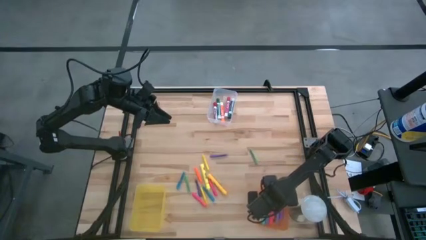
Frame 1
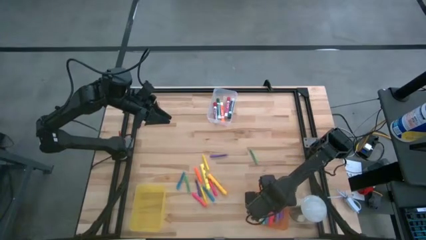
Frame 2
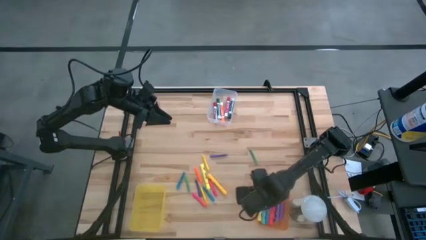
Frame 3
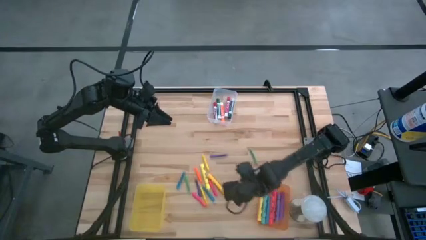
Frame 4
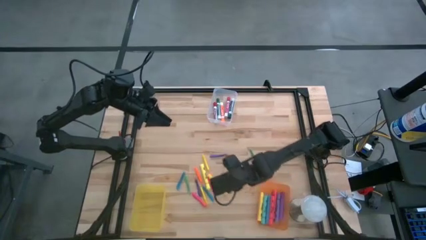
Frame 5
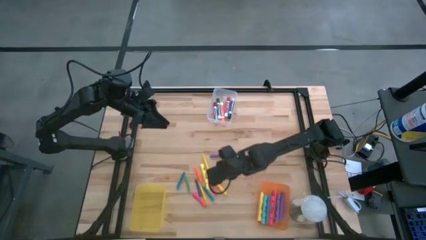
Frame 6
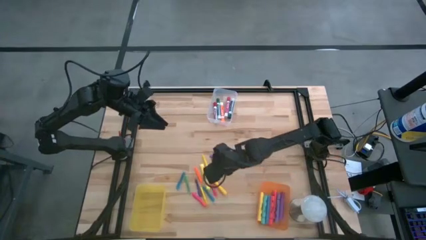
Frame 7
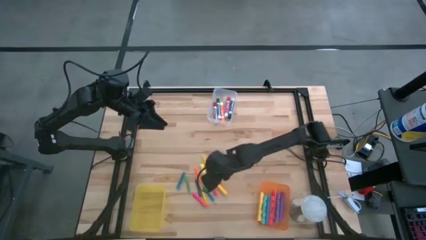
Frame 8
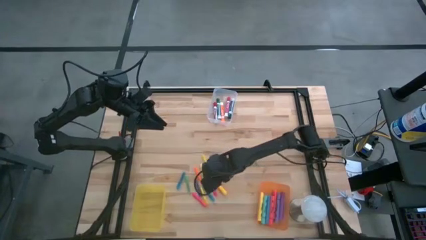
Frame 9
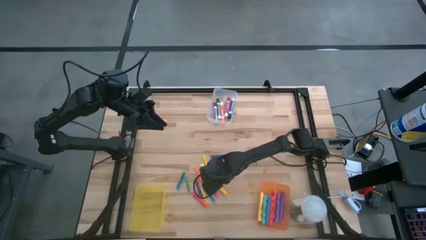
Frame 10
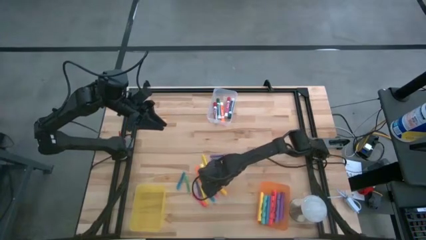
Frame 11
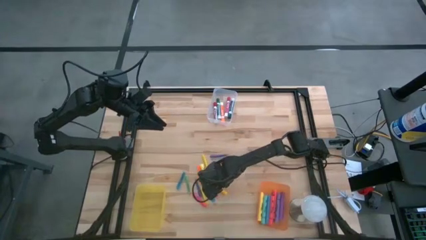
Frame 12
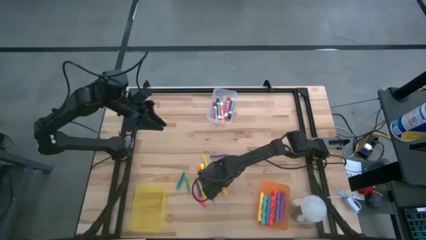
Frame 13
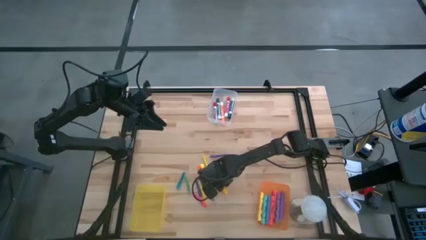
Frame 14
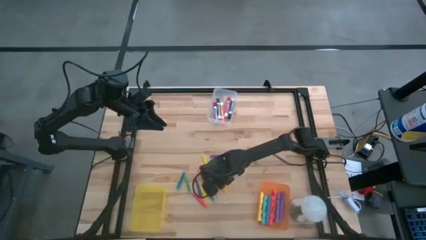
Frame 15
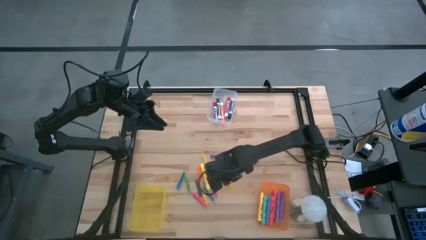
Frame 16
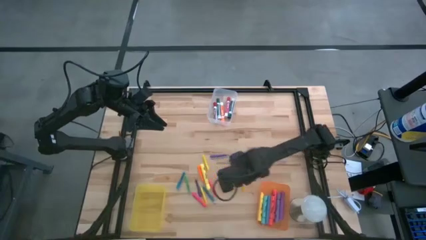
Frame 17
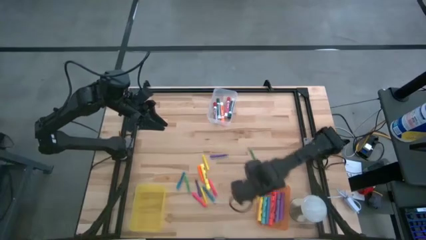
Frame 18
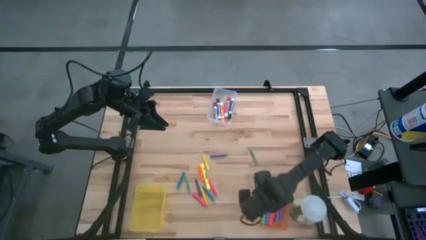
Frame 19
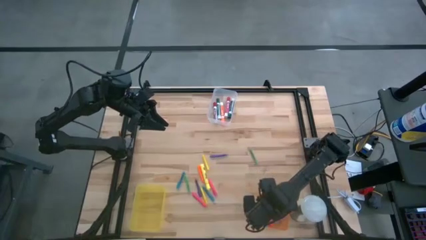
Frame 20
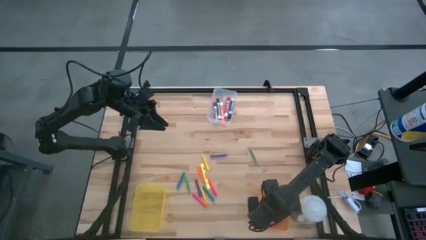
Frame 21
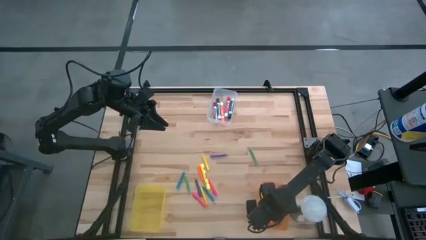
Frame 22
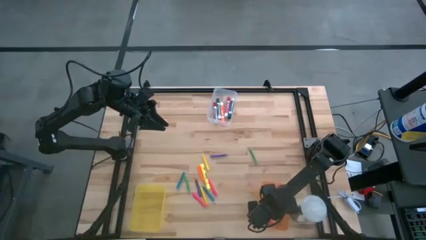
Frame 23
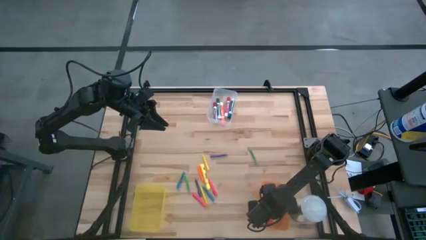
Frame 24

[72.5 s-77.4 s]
Task: Pick & Place Markers
Put the yellow highlighter into the orange bin

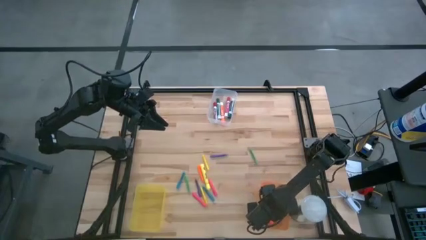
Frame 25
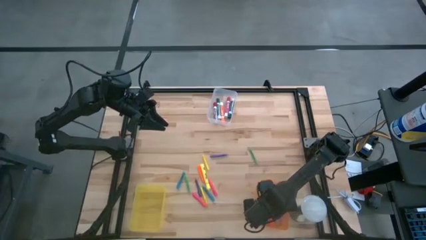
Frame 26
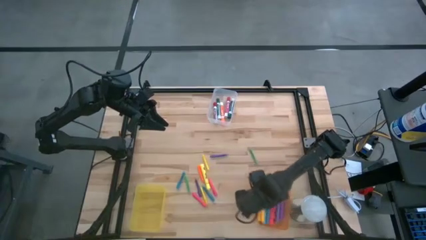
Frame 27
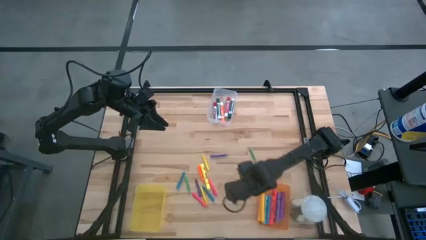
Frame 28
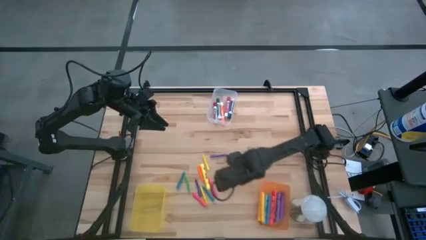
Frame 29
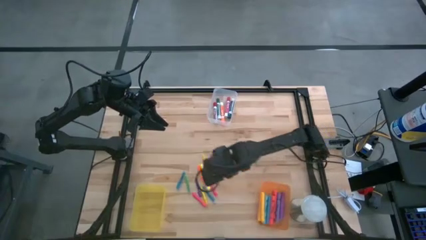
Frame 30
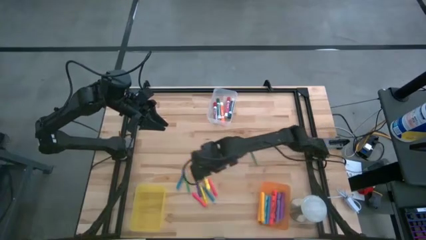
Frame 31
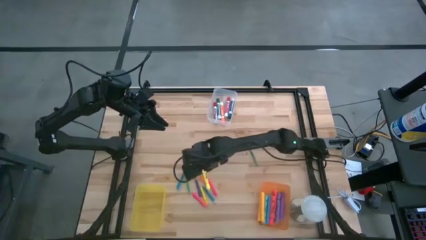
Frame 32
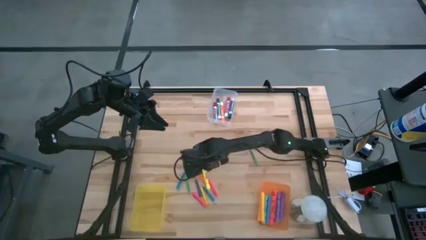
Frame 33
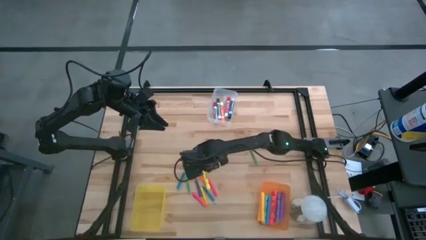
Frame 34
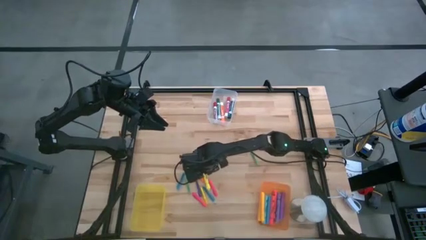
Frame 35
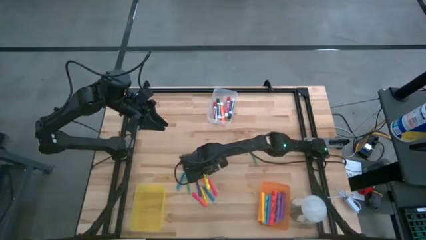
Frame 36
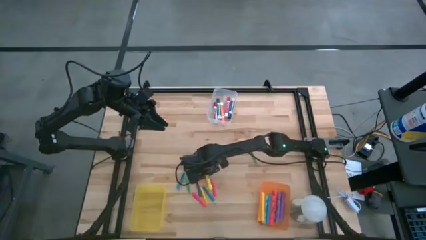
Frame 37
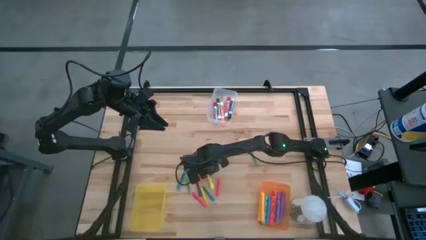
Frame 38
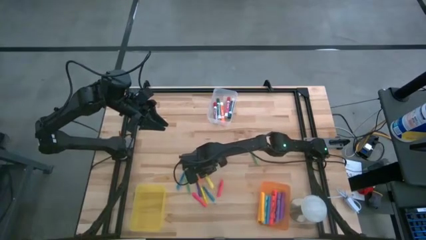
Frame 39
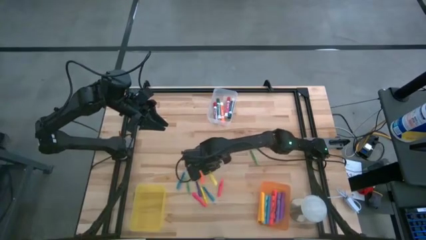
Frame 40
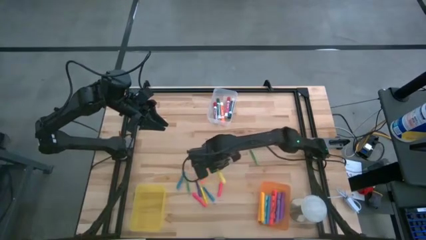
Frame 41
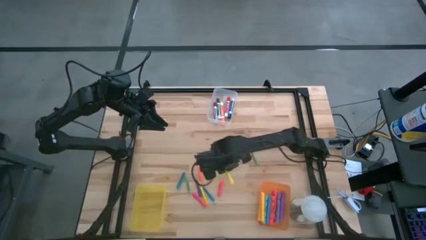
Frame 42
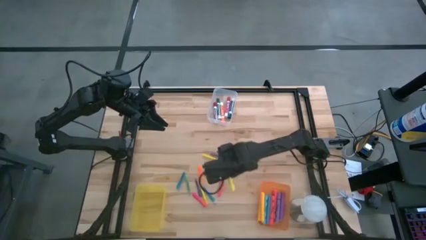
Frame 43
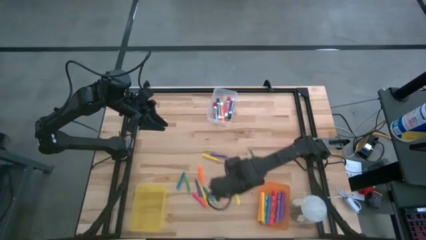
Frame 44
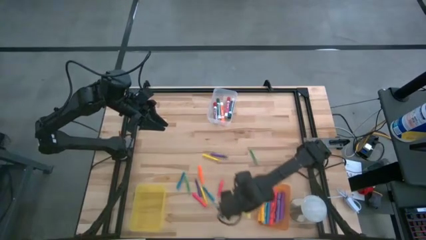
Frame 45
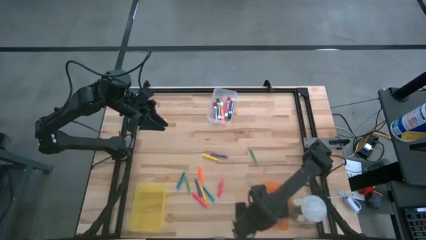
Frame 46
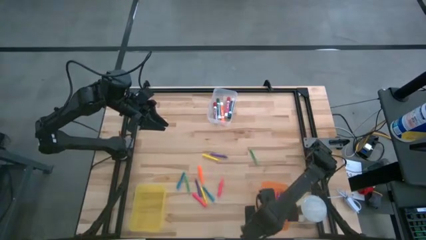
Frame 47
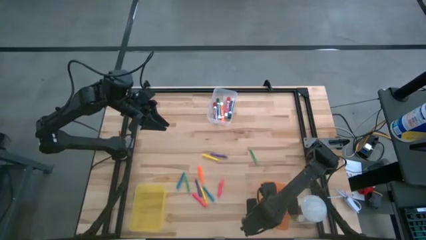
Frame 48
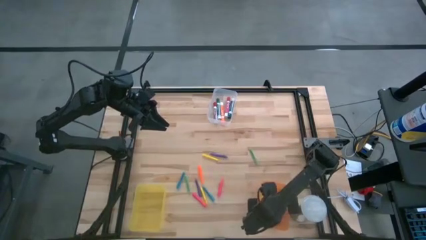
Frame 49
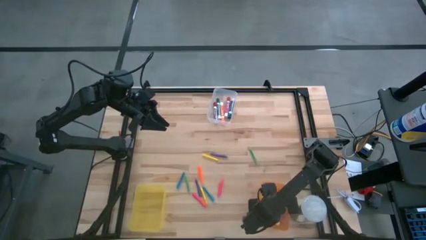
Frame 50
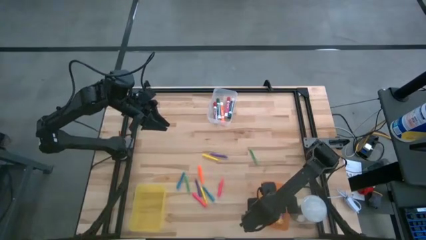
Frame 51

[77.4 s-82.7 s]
Put the yellow and green highlighter into the orange bin

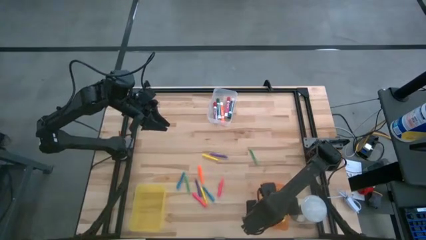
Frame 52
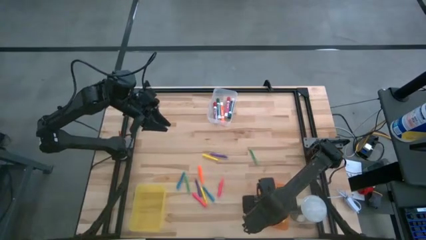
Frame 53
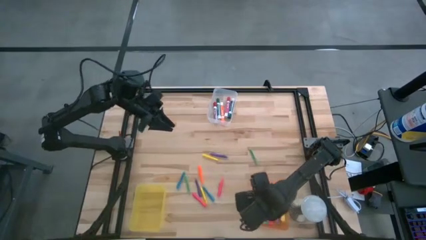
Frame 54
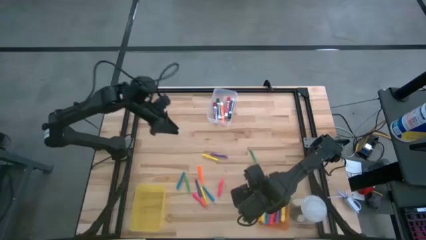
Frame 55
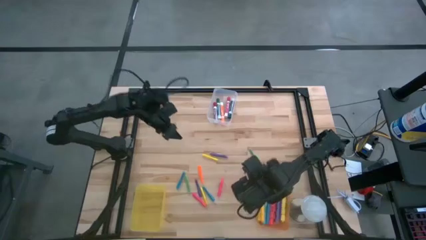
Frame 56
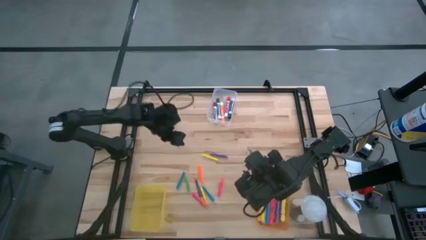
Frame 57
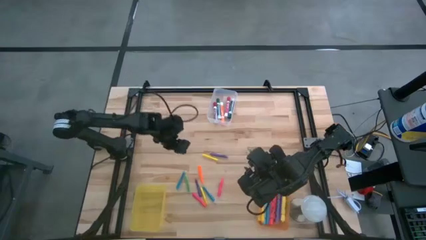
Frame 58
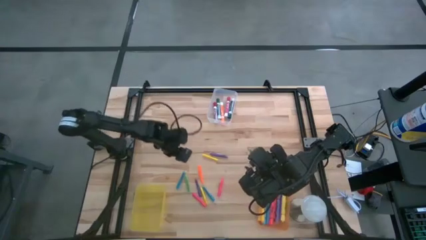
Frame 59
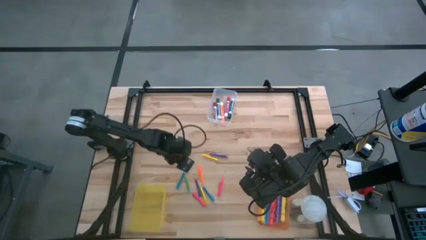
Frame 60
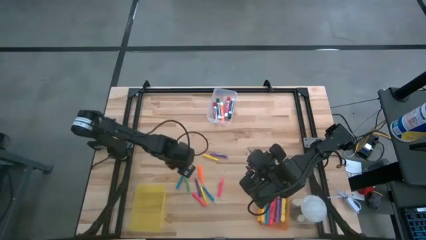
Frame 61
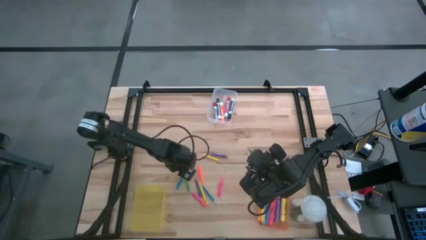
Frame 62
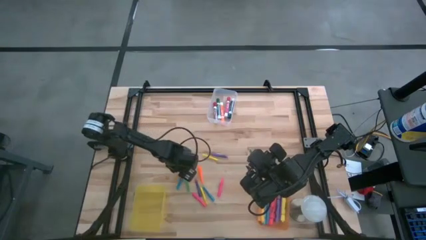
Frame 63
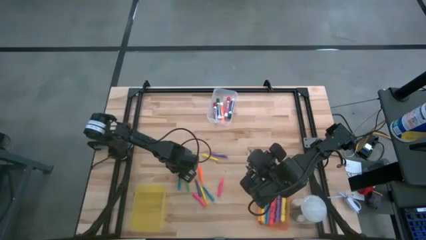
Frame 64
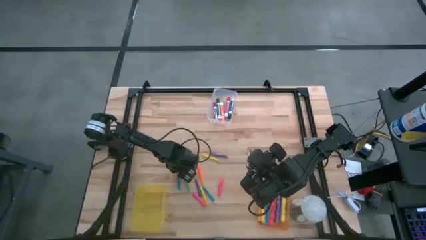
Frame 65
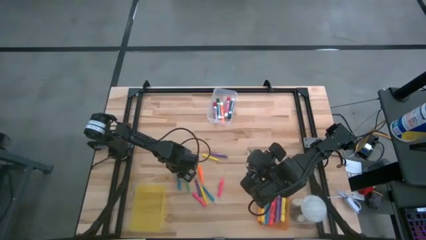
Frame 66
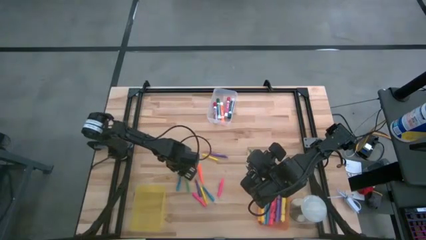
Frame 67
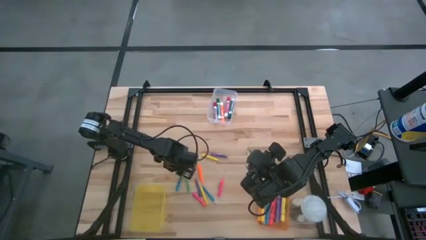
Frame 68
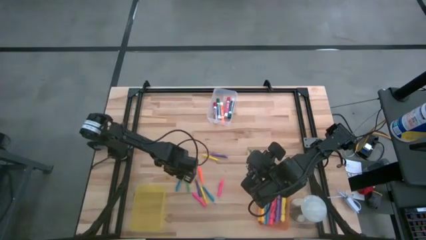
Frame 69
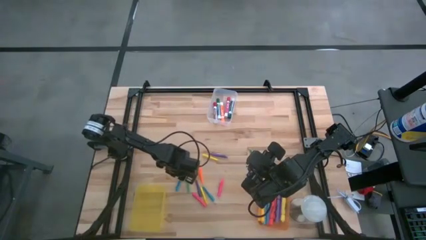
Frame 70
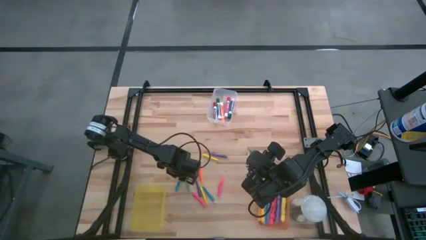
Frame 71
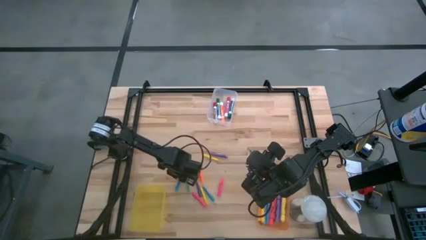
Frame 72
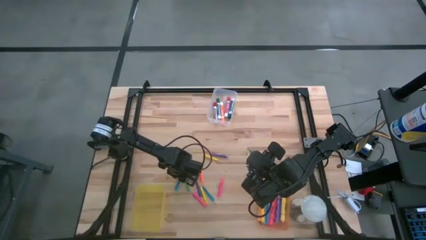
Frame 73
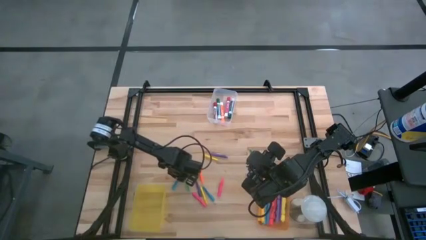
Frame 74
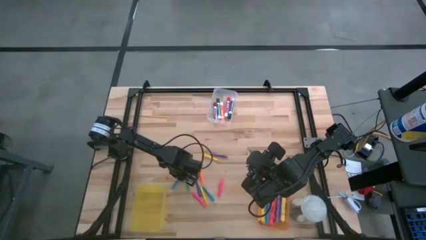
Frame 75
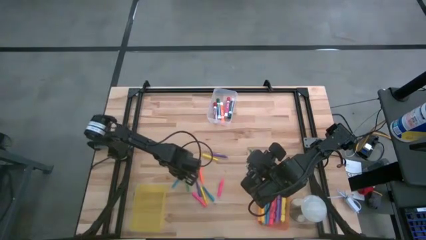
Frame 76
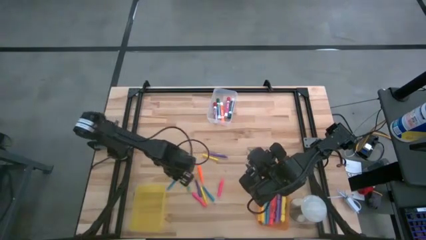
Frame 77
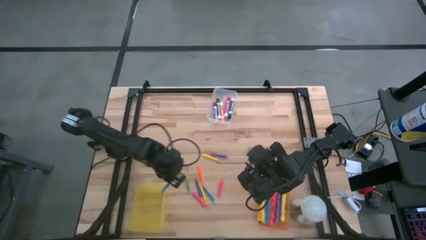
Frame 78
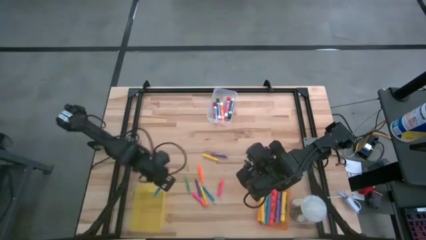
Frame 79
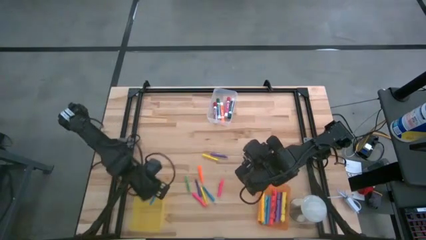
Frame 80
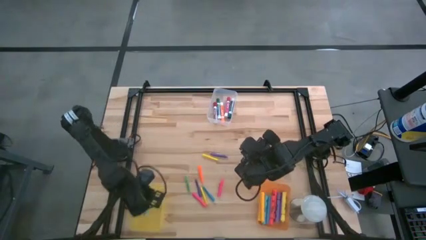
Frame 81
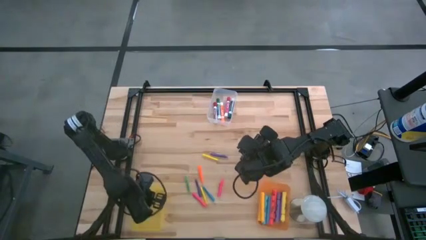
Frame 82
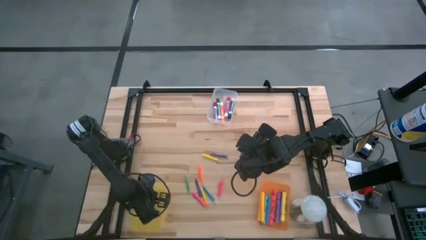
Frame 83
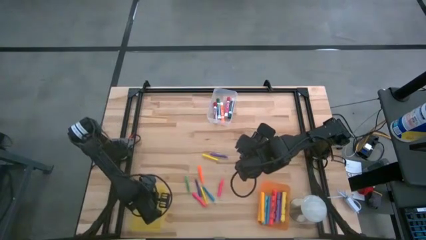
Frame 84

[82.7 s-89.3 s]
Put the blue highlighter into the yellow bin
